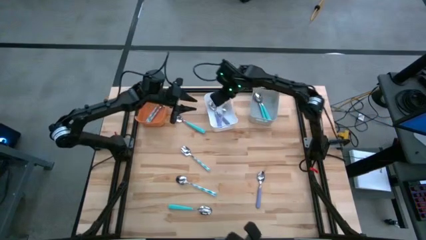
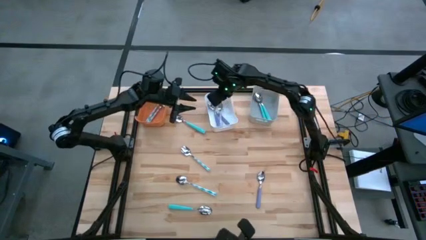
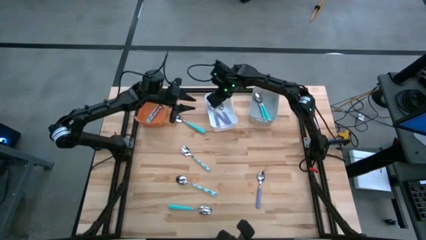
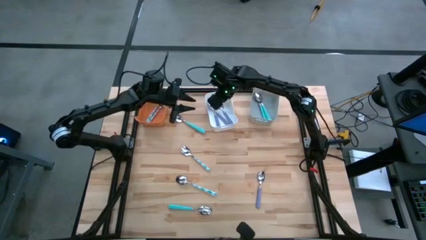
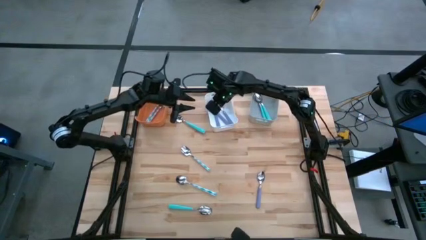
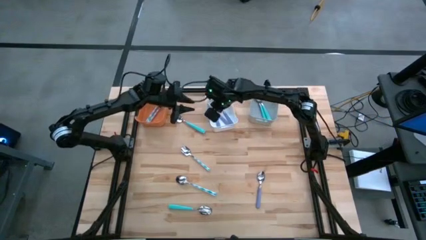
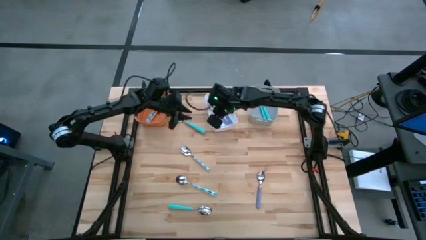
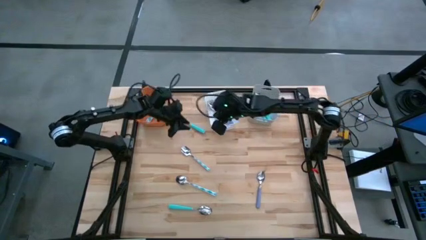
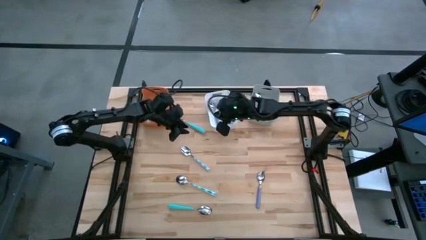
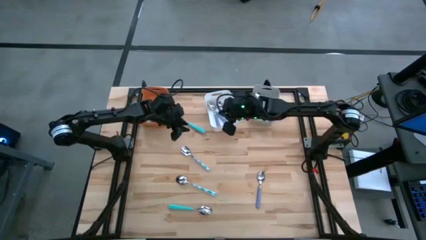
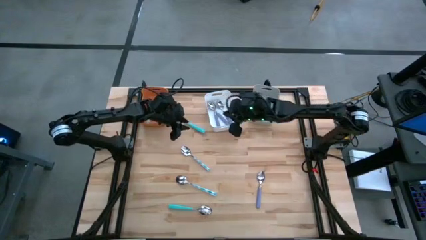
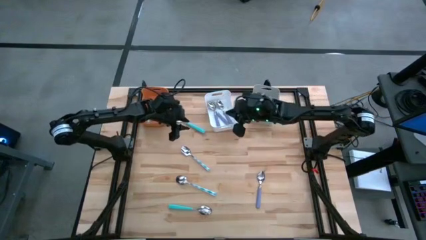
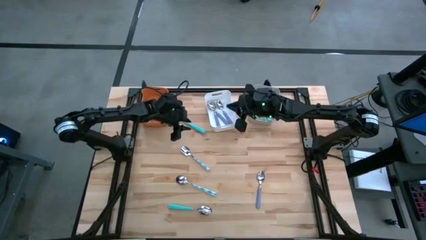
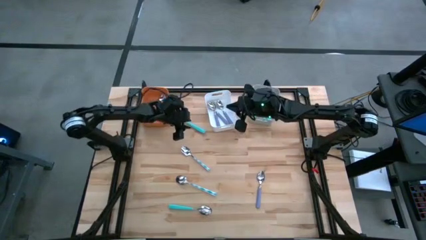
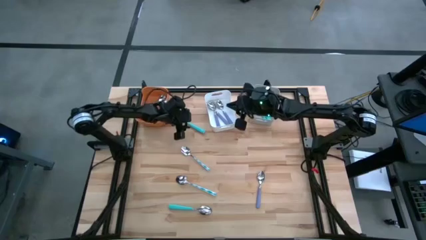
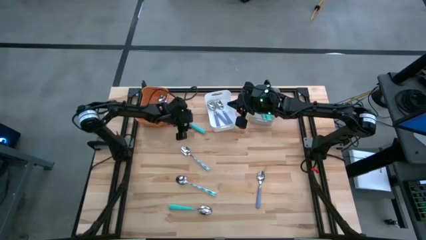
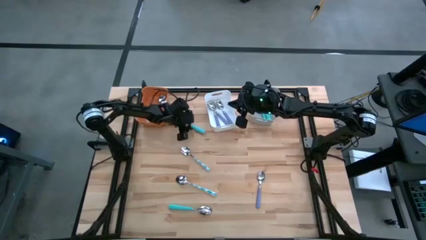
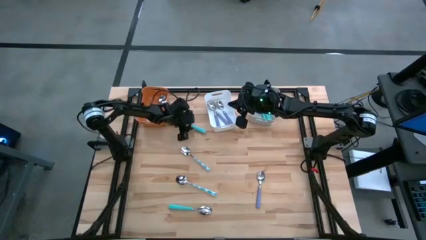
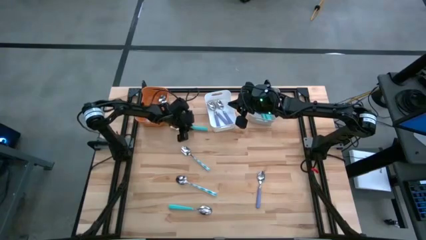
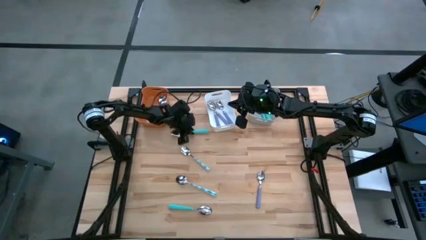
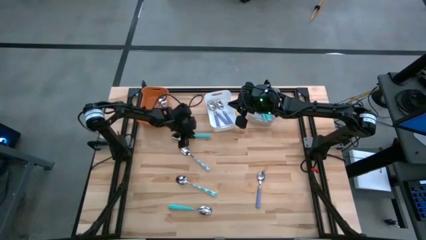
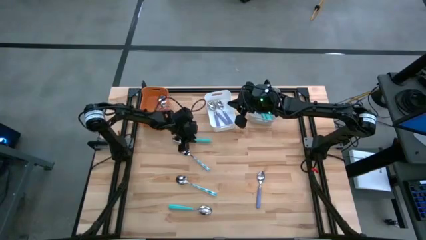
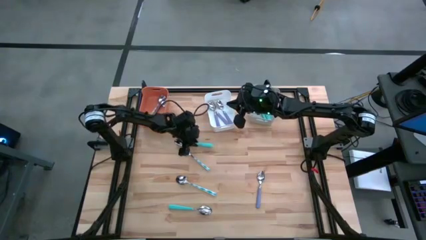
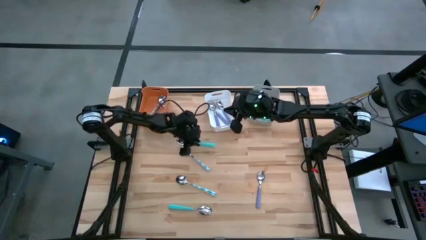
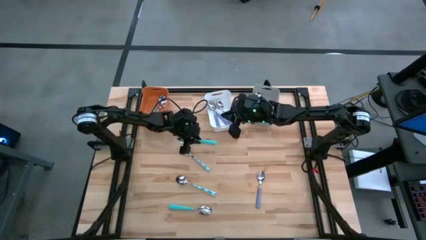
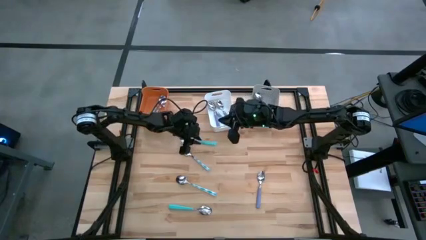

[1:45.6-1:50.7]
Task: Sort silverware by color (type)
Put the blue spoon into the gray bin

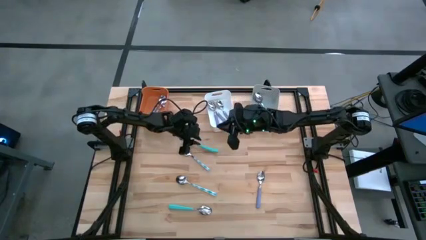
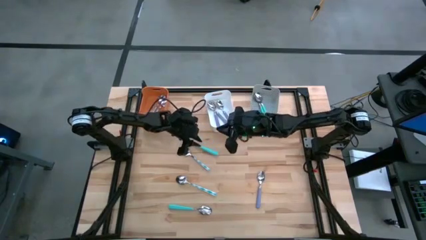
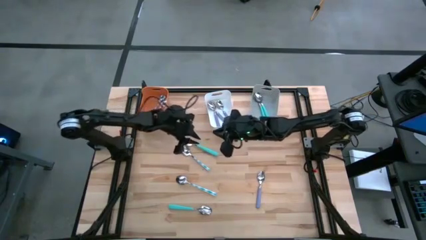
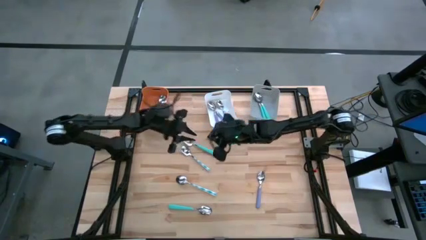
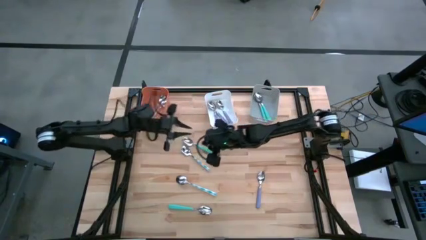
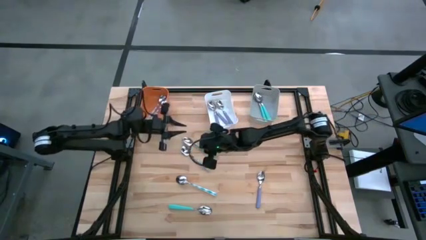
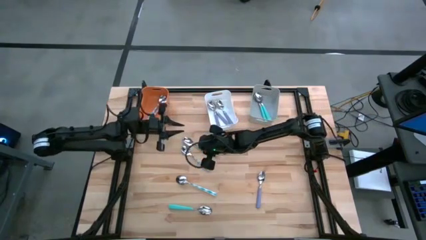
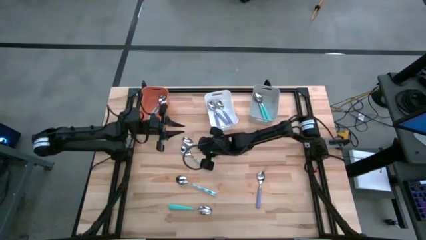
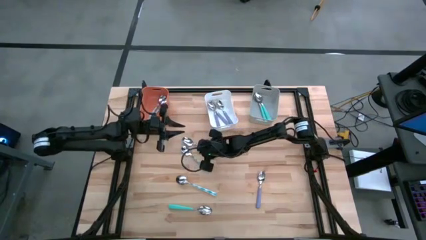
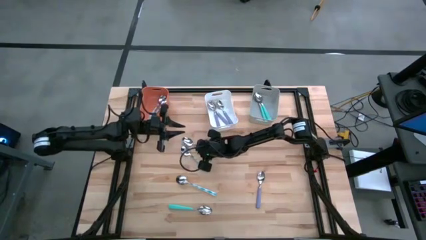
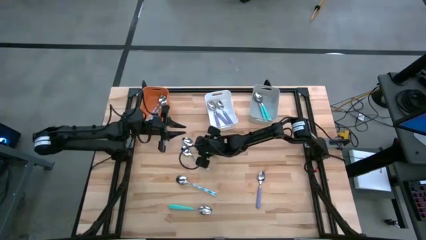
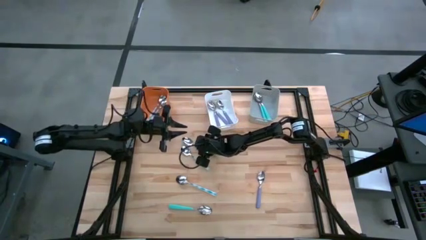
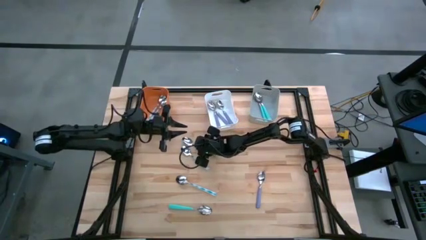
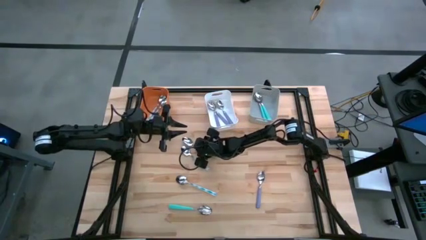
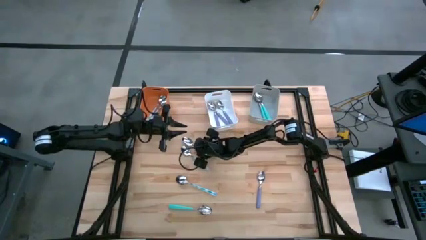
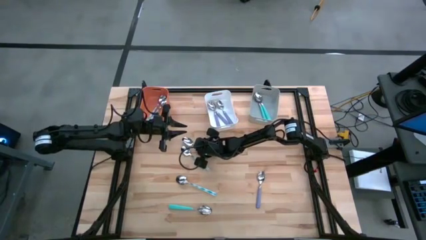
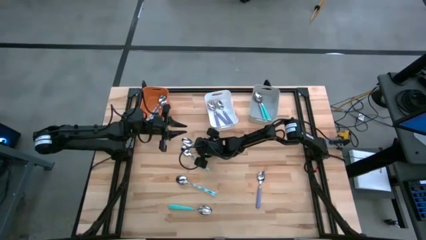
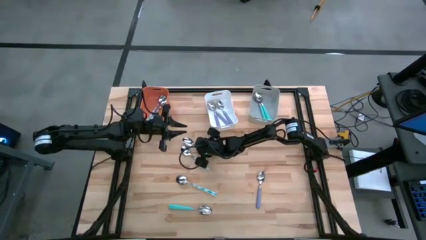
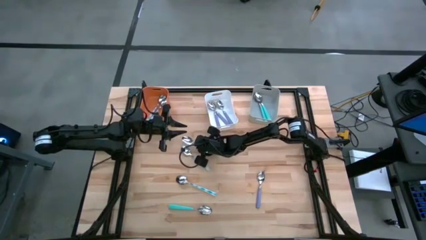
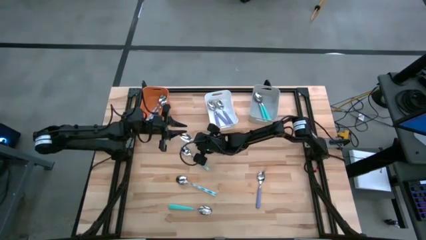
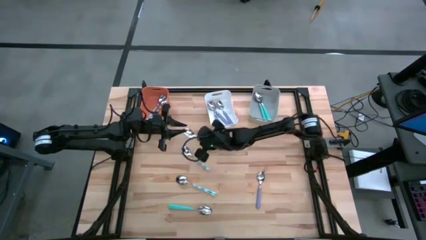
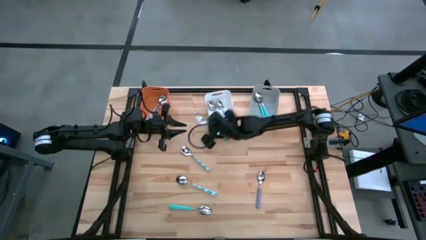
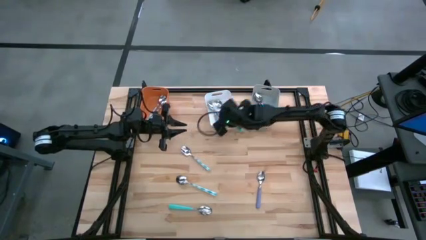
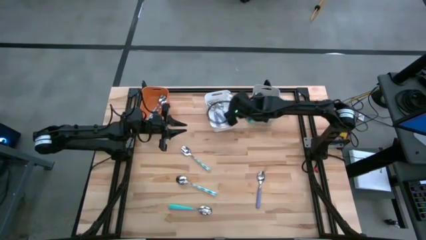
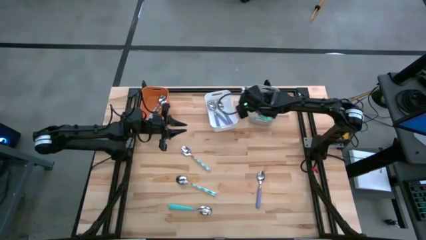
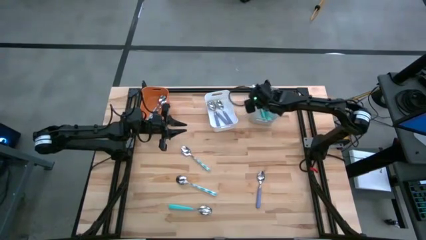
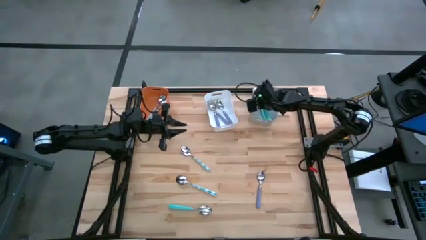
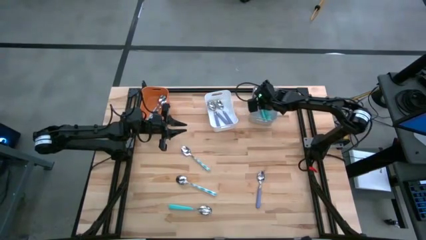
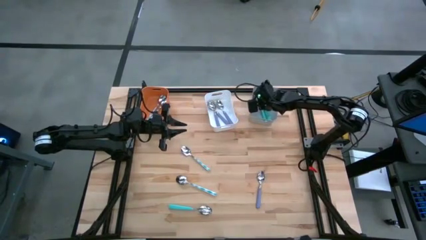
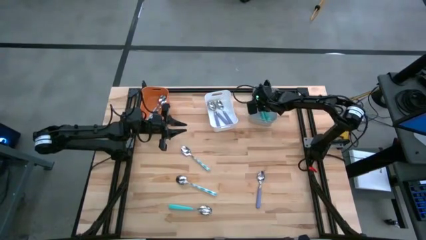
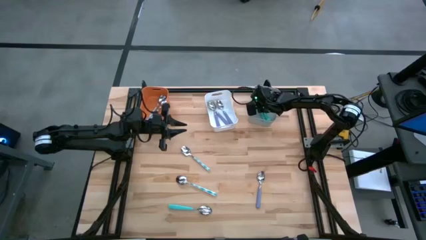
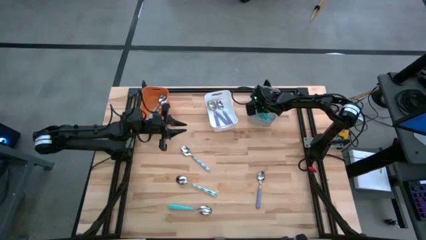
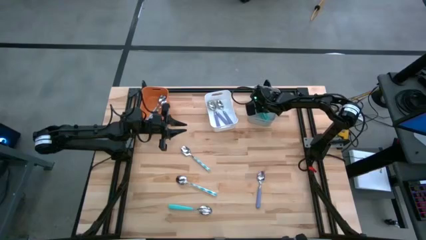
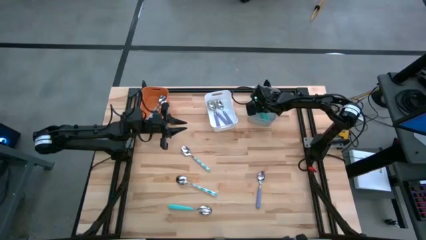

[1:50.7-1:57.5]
Put the blue spoon into the gray bin

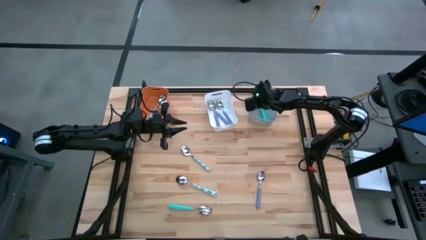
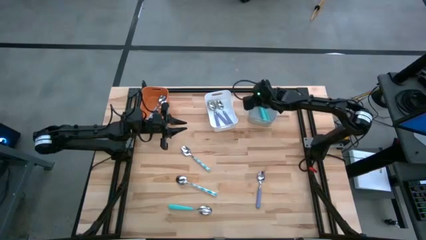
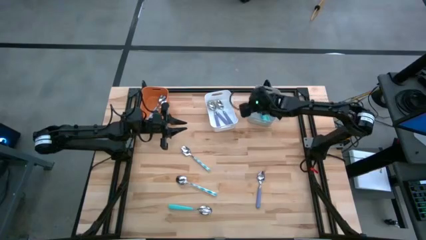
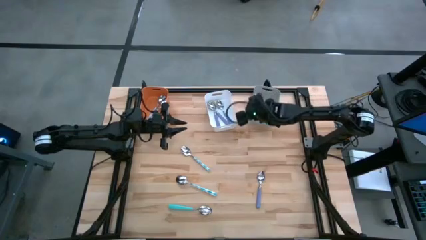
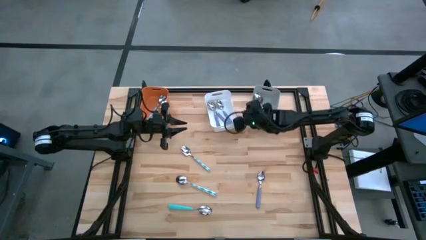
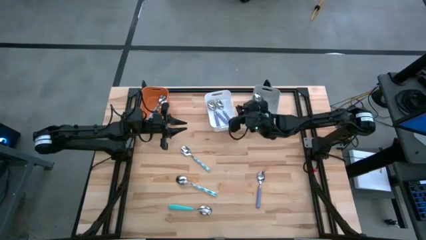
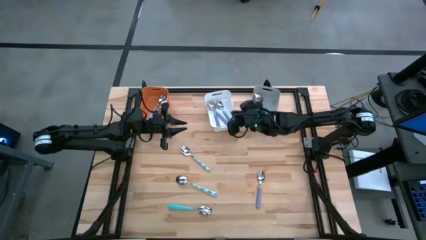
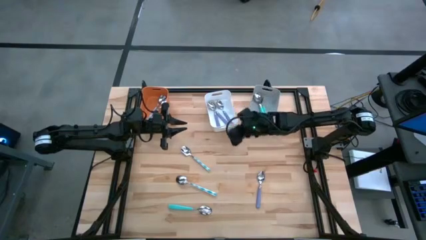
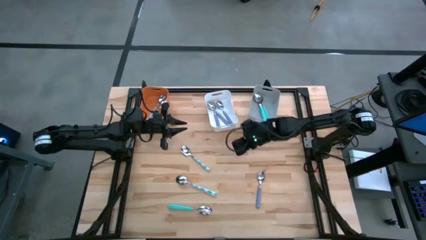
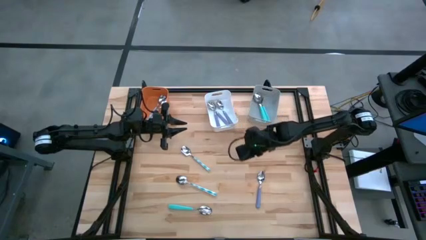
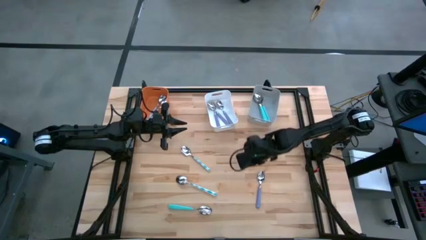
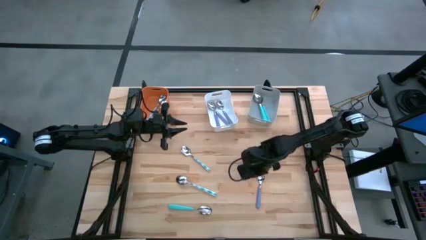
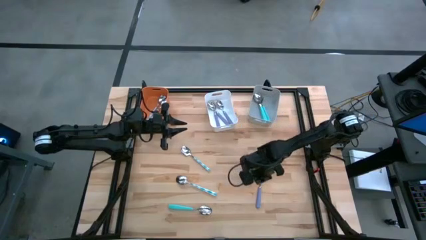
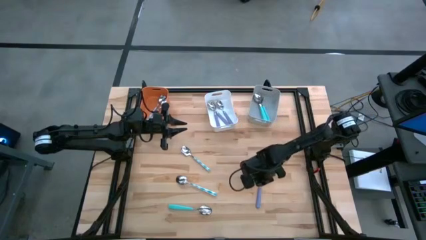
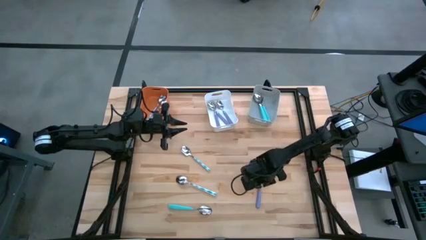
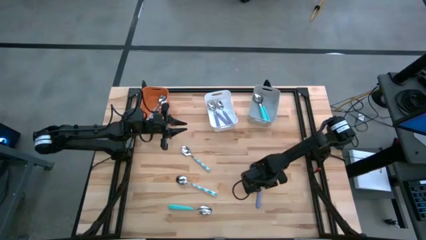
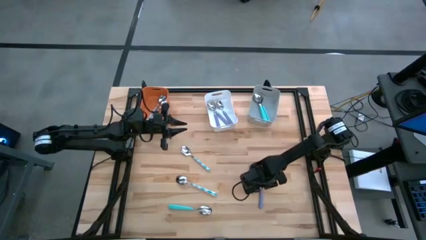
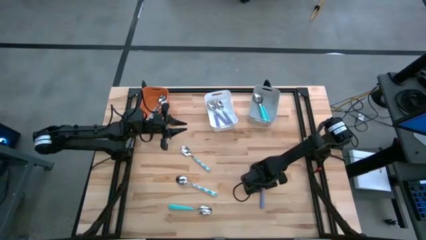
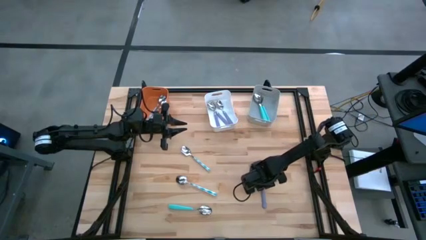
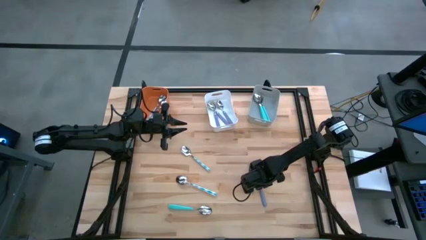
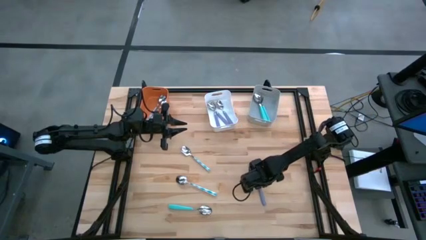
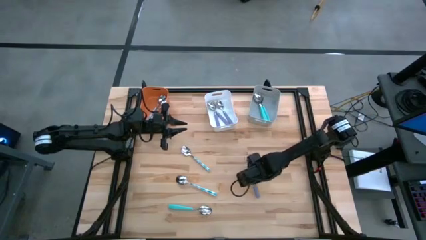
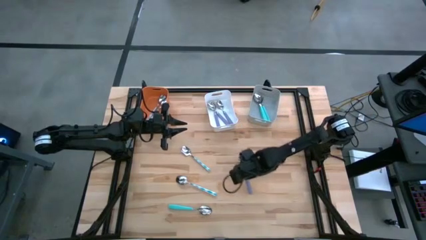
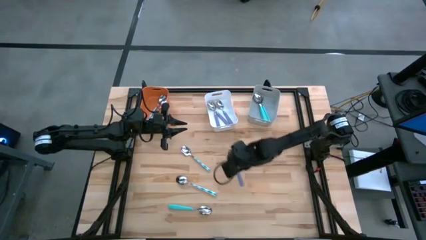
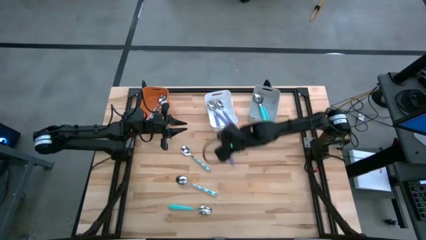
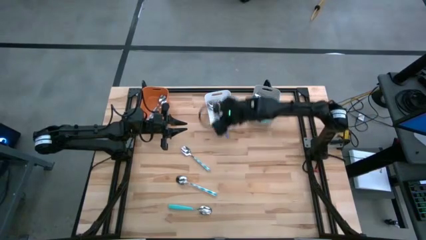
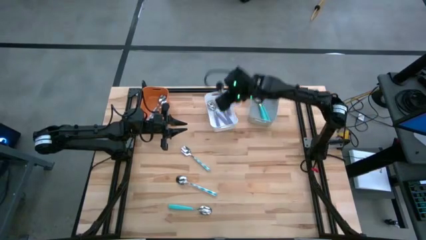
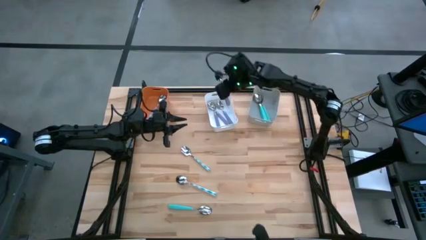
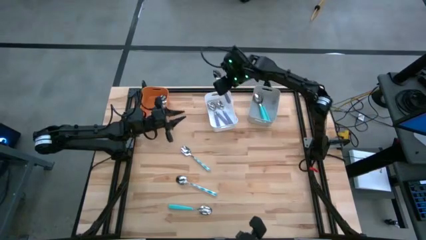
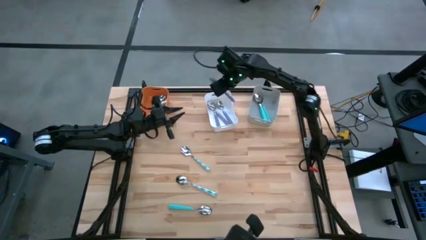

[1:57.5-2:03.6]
Put the purple spoon into the white bin
